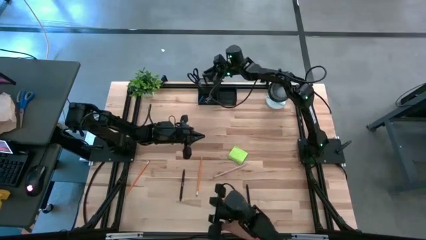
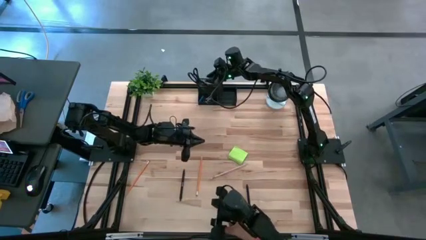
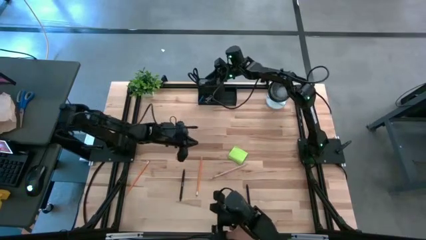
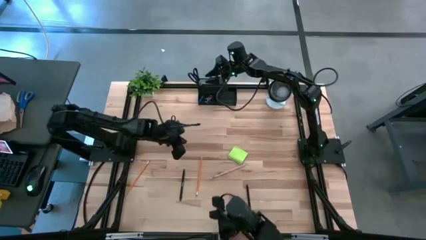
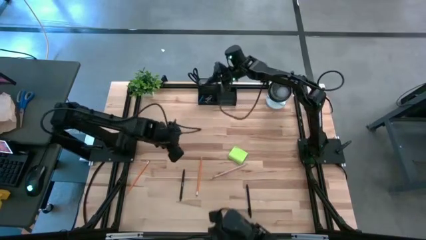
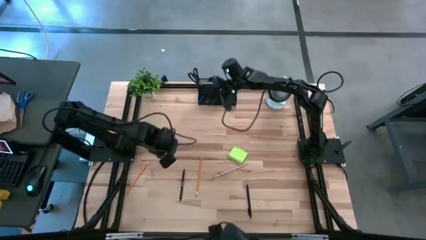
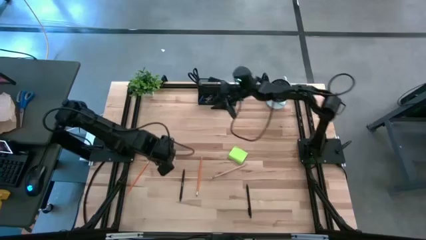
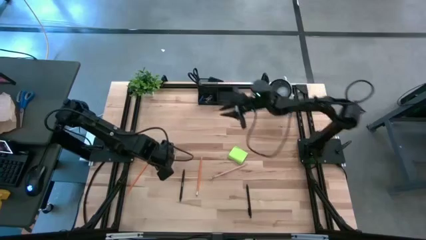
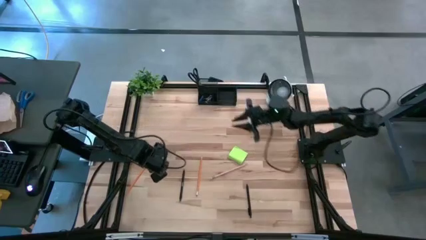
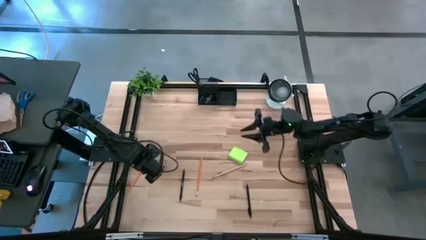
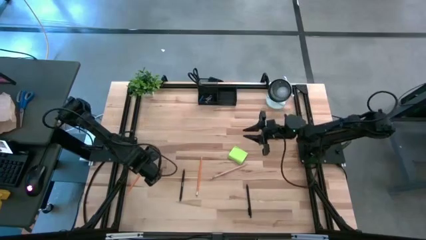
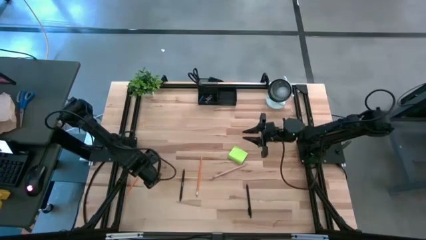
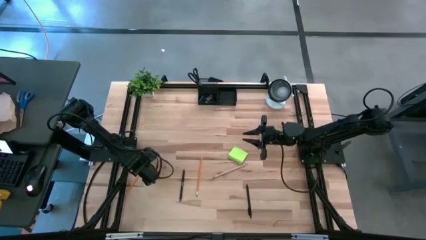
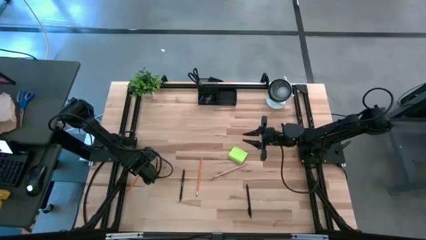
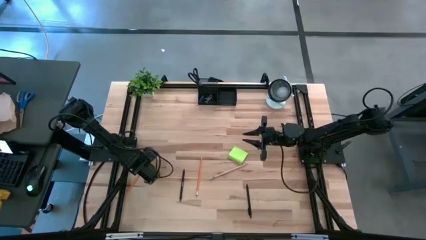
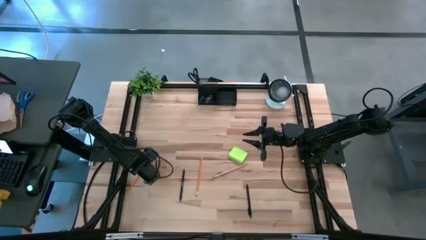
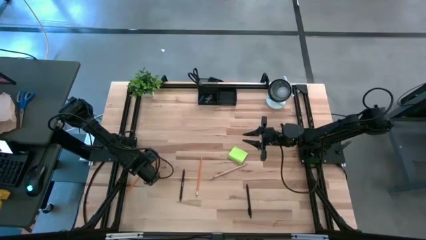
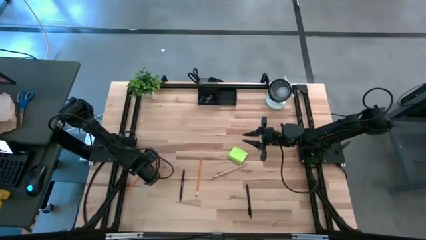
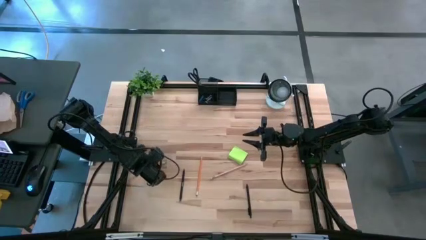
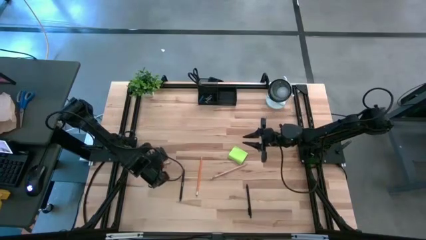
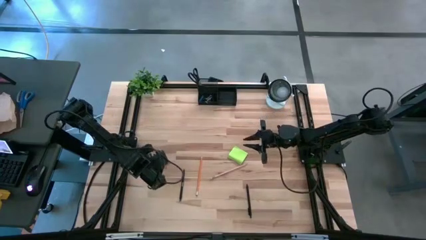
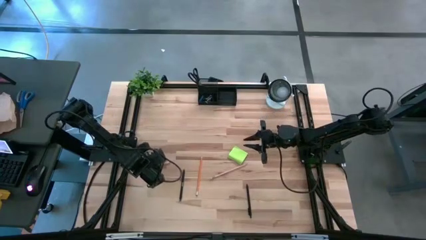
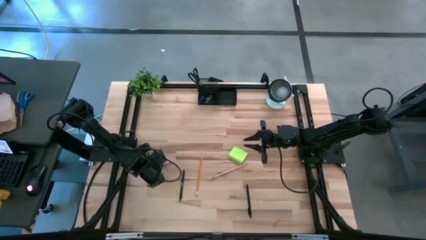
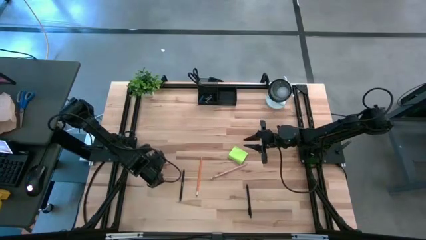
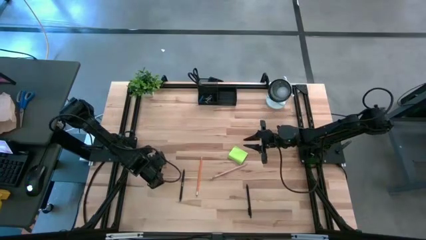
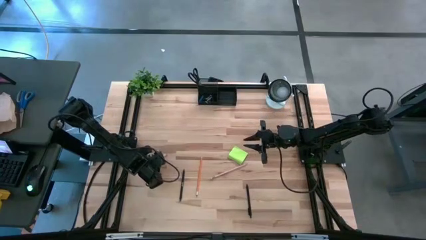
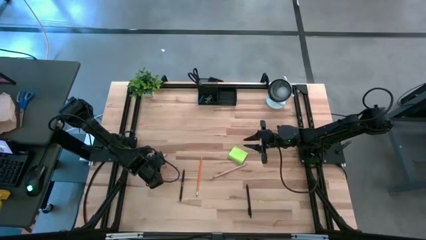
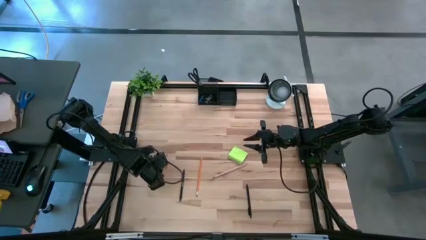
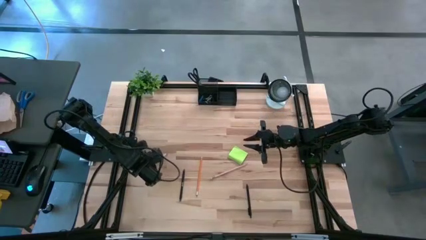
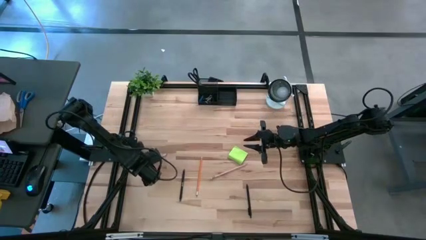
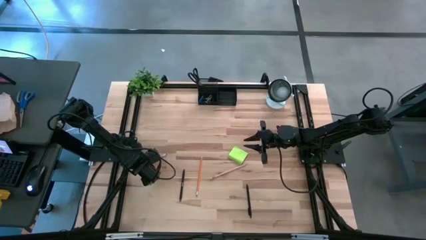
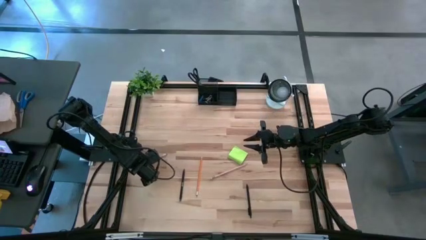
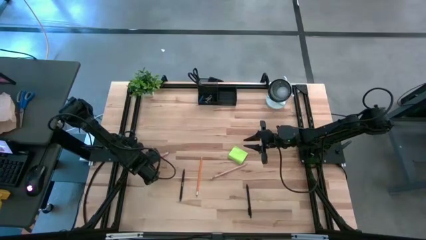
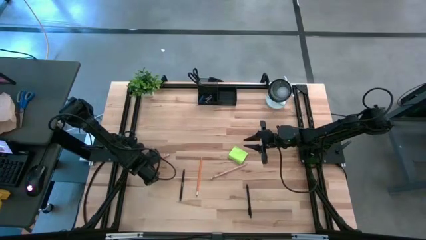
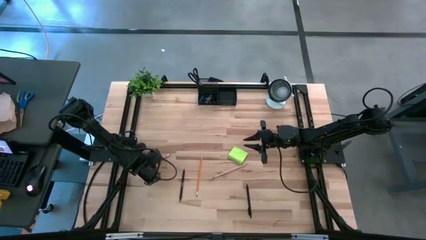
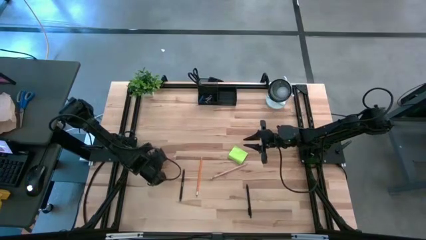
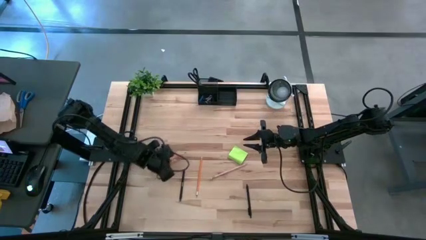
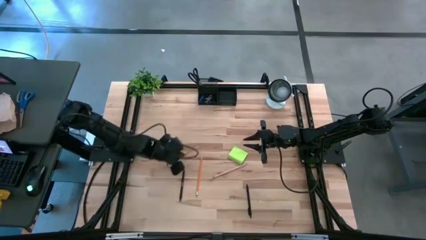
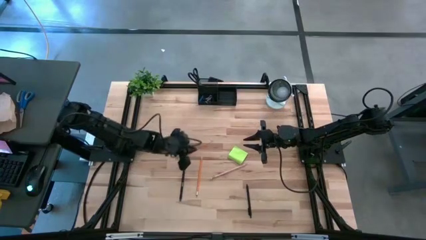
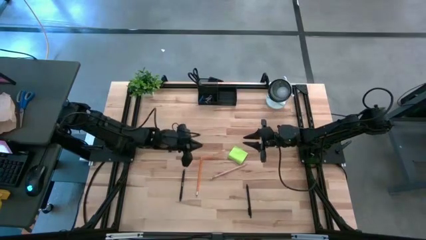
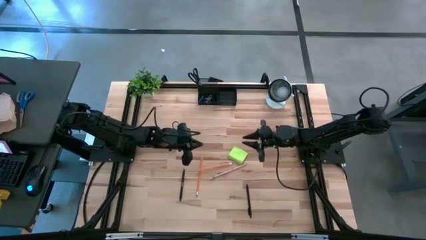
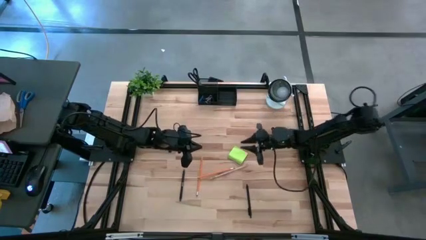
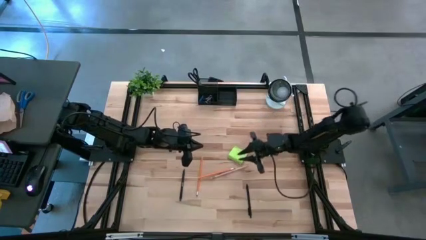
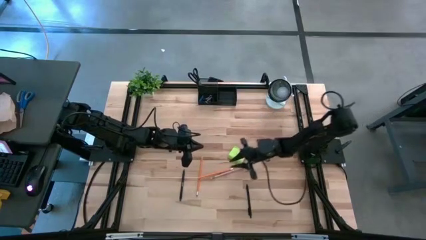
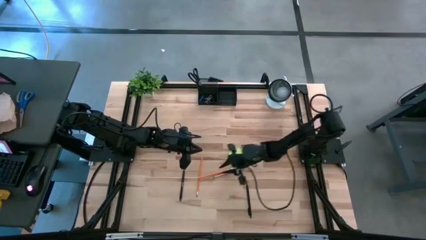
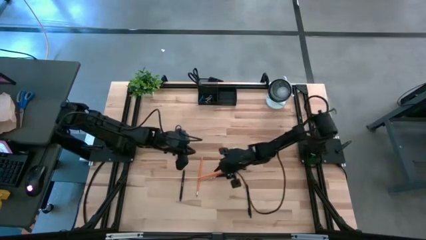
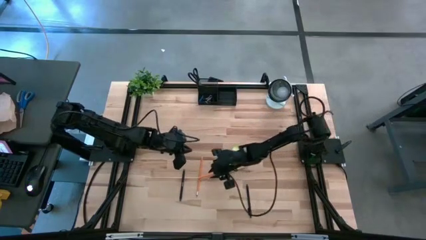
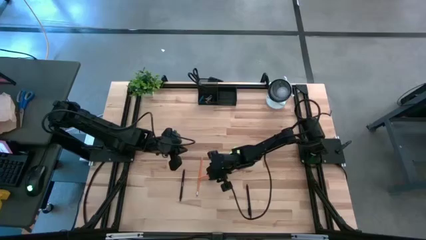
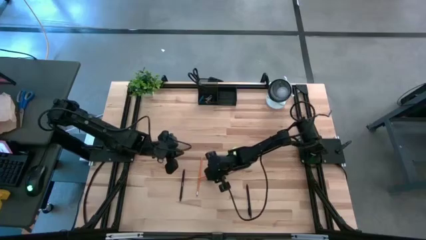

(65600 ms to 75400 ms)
Task: Pick and place office supplies into organizer
Put the left orange pencil into the black desk organizer

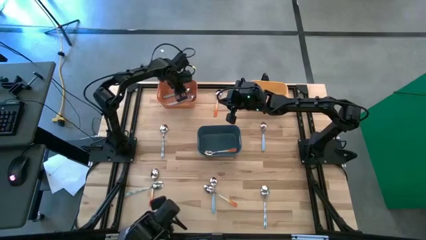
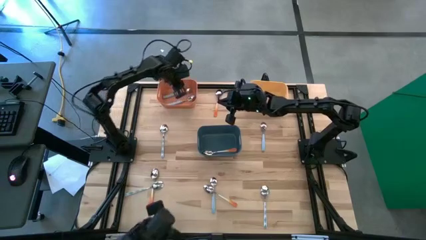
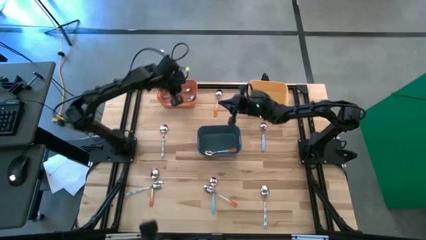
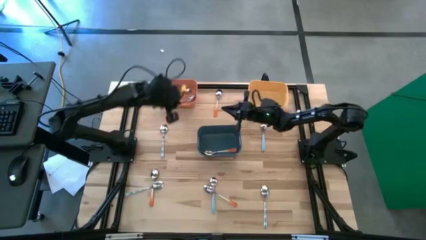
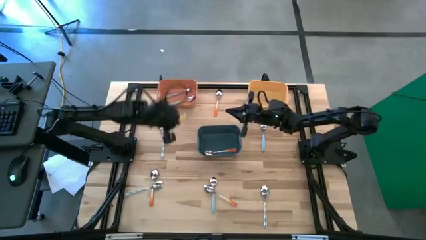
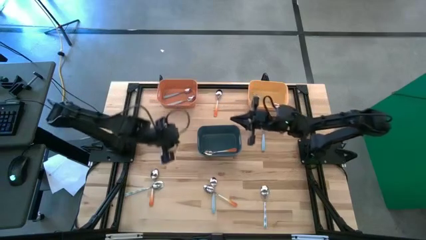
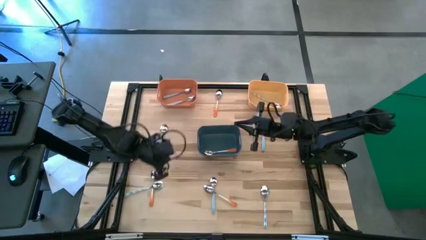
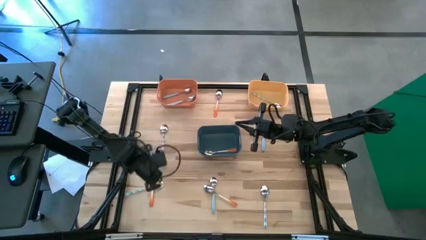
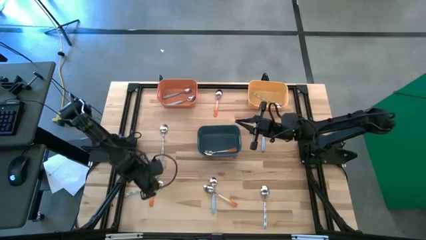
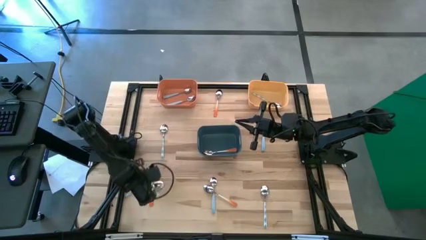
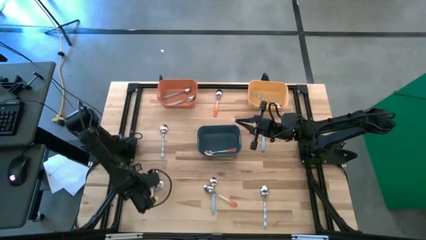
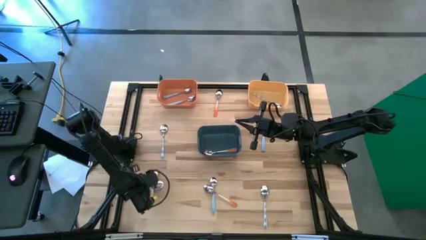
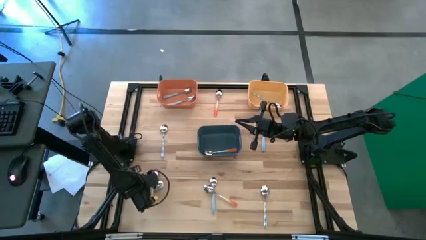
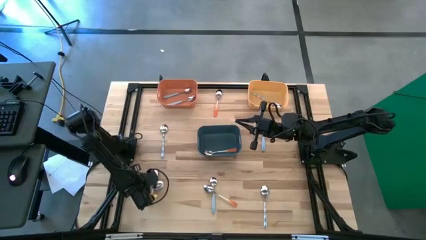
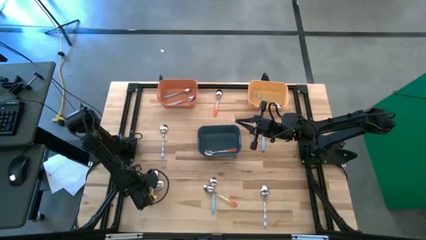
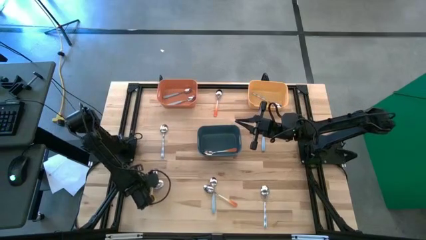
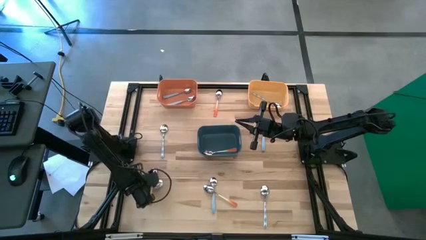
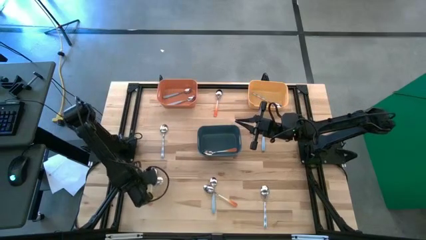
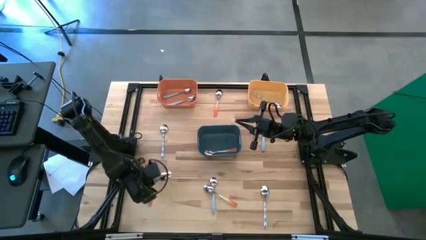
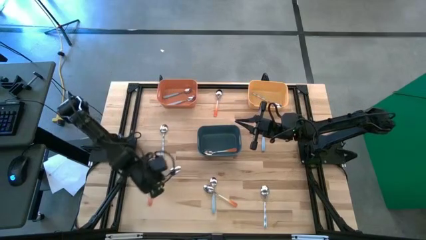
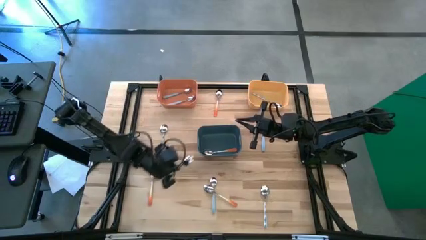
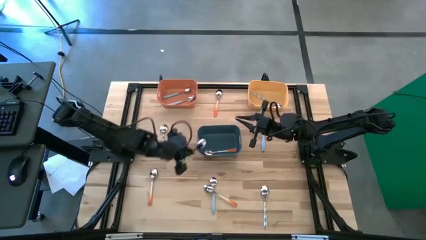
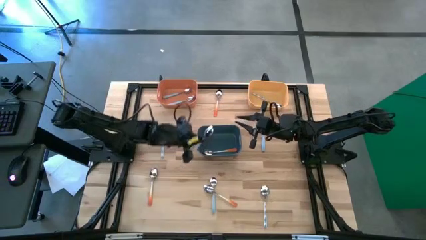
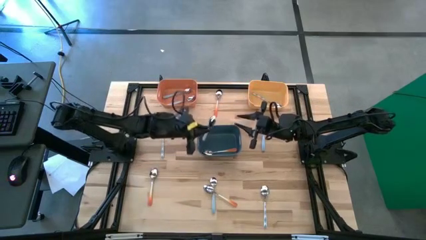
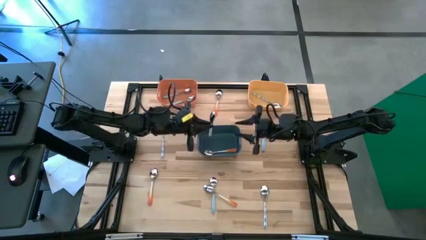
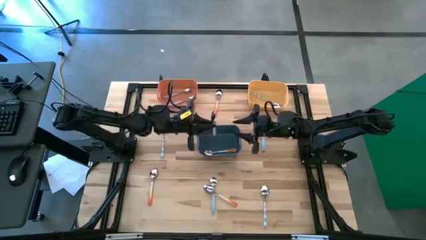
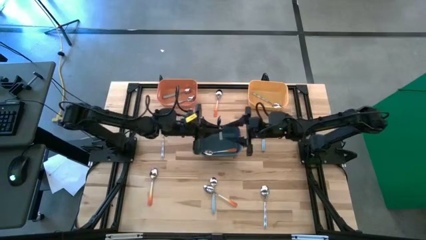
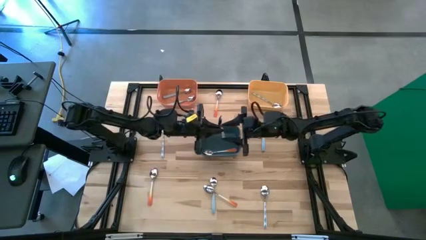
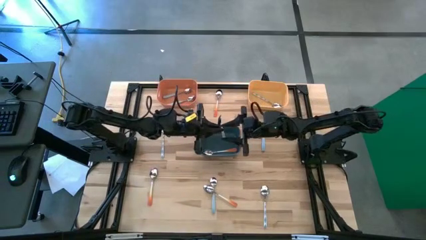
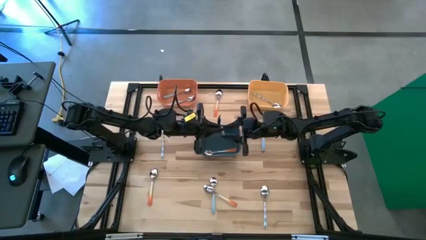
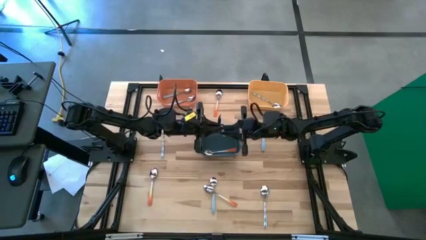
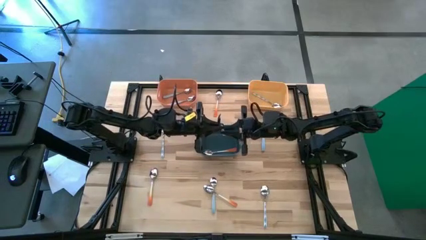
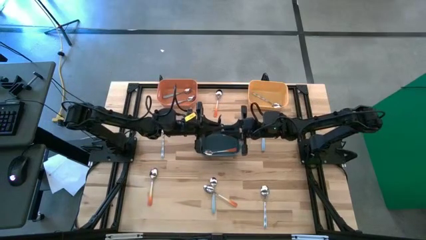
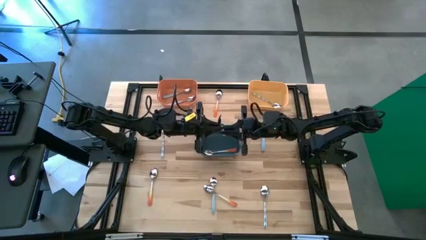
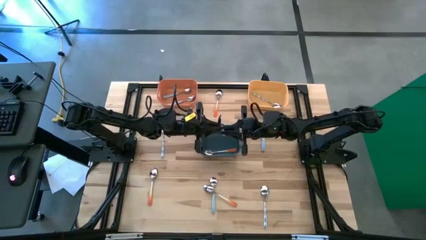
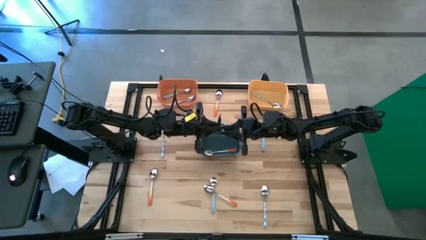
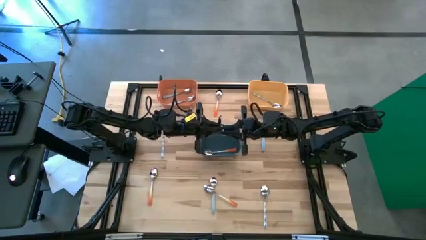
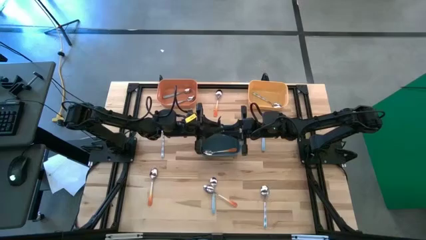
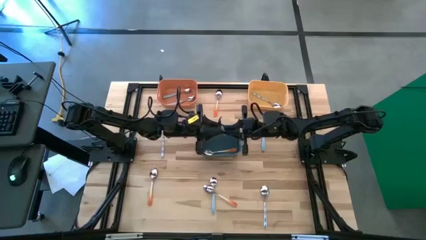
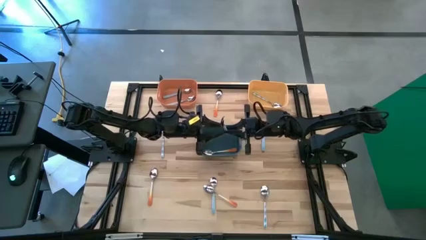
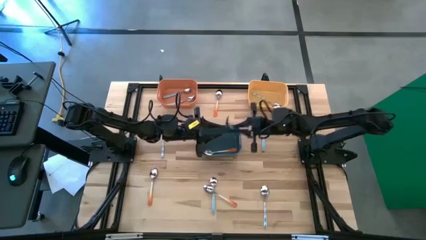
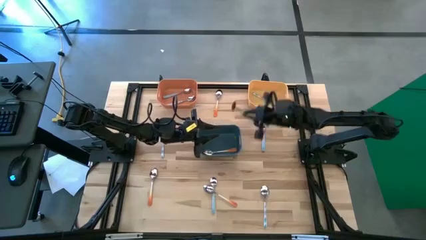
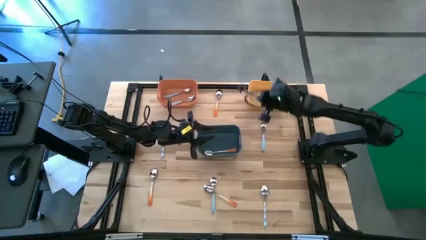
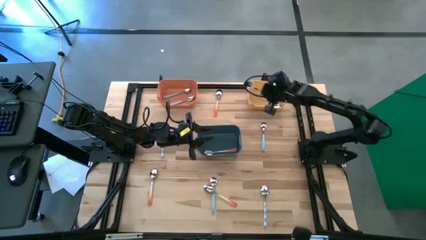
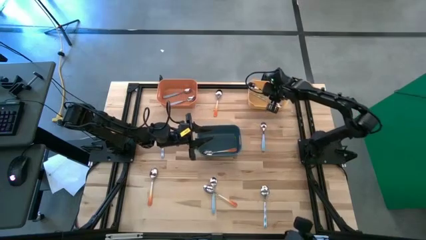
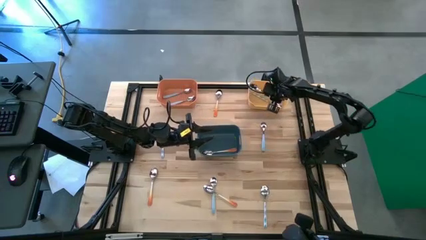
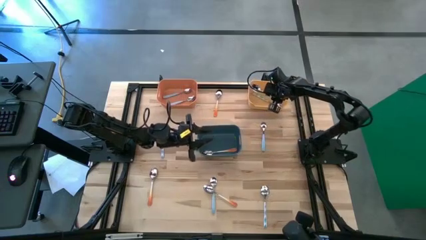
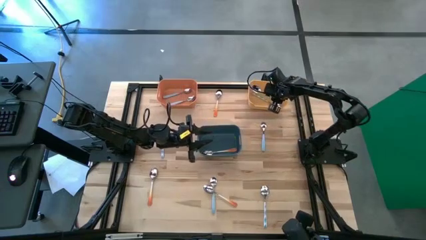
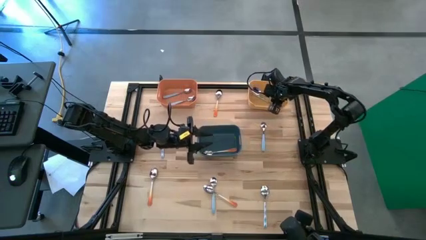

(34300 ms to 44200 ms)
Task: Sort silverware by color (type)
Put the white-blue spoon into the yellow bin
